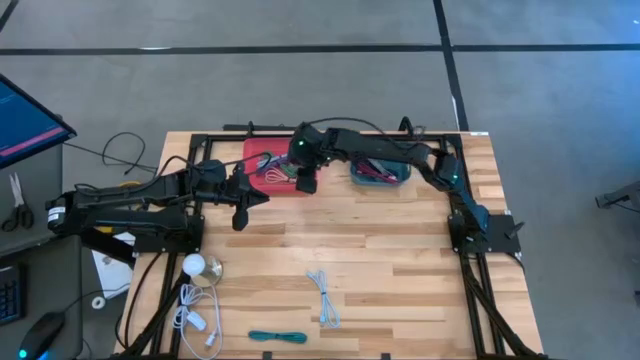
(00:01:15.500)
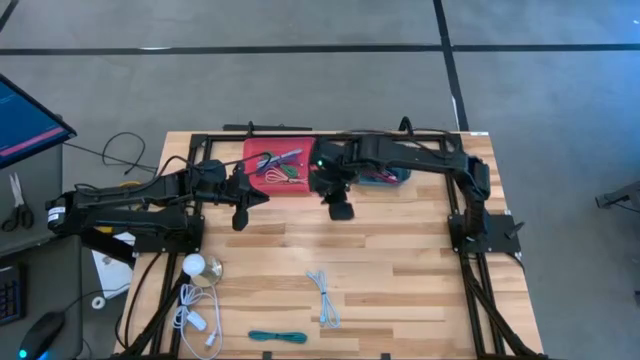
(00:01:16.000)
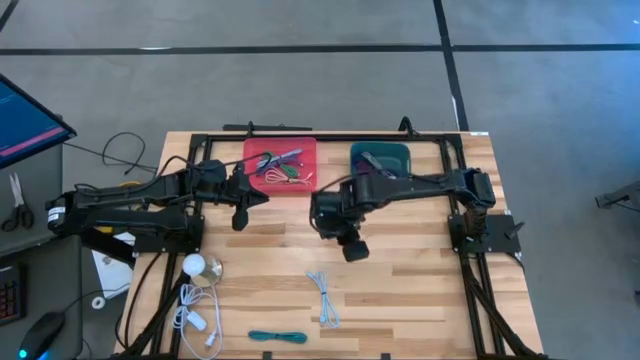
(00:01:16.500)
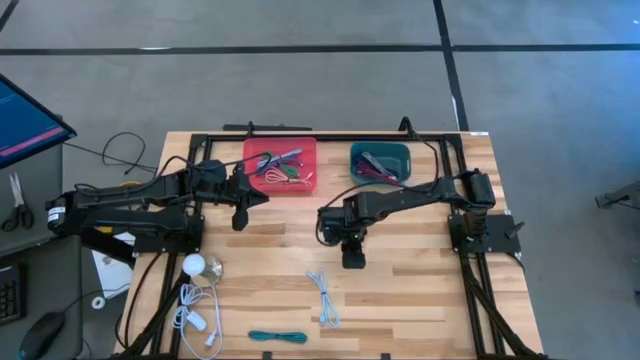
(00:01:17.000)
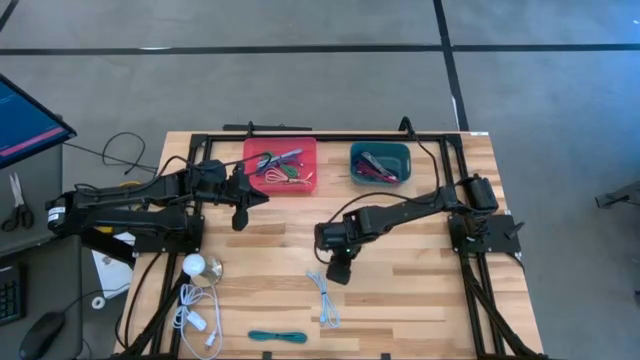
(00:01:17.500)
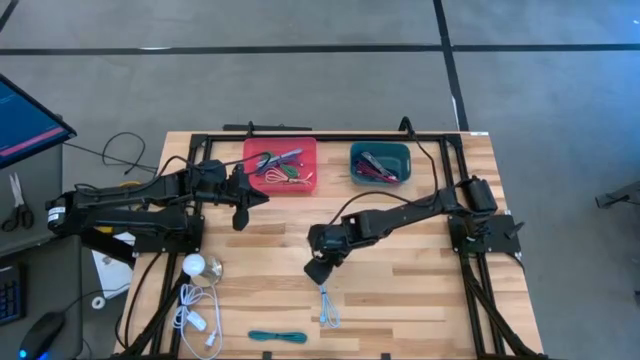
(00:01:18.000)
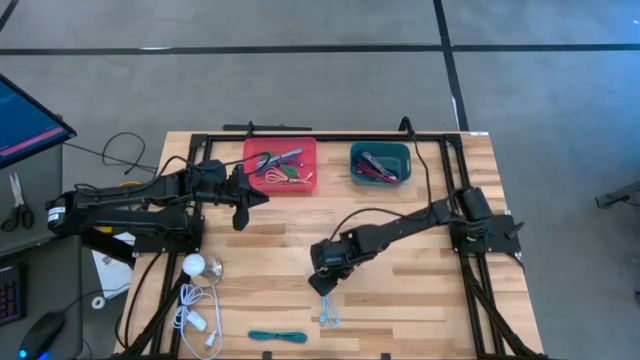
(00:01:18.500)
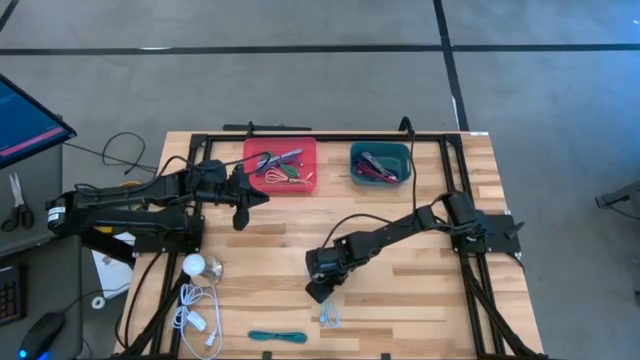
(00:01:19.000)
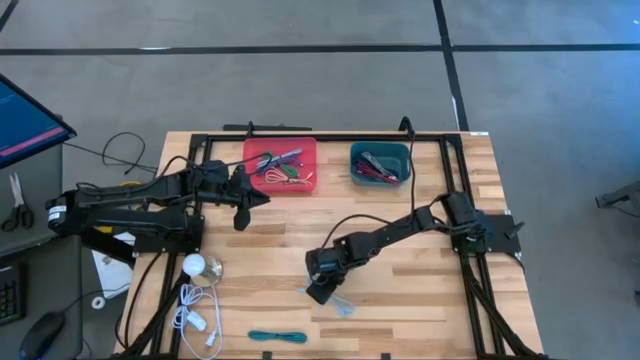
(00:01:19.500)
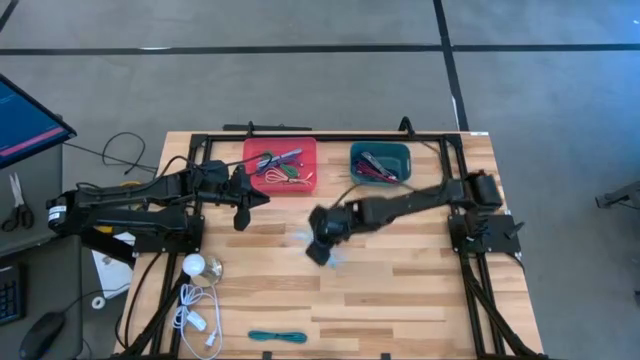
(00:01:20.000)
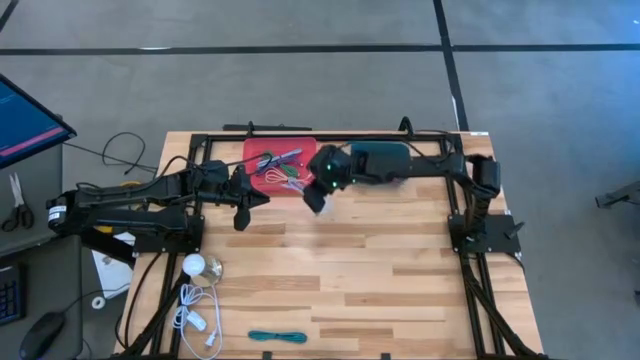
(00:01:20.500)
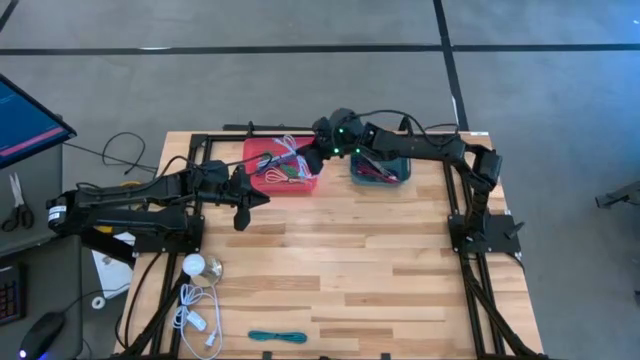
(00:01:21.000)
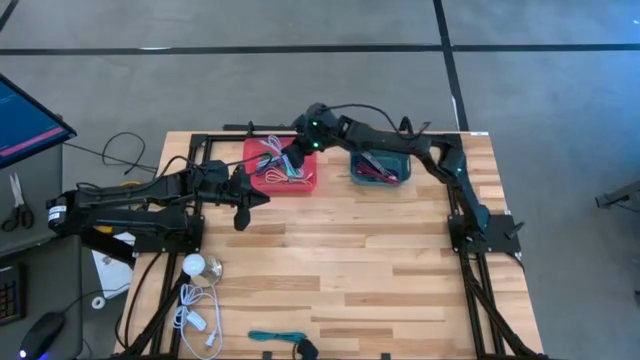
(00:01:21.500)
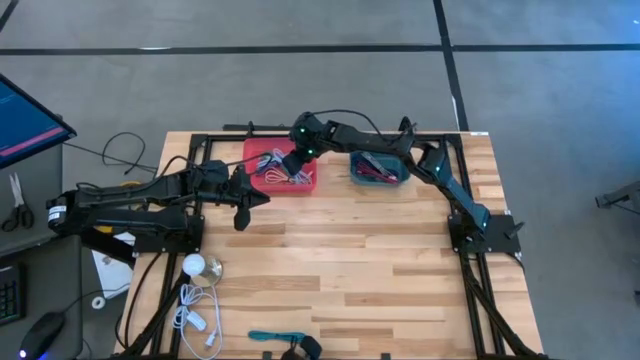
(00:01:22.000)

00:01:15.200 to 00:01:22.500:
Task: Pick & Place USB Port
Put the white charger cable into the red bin

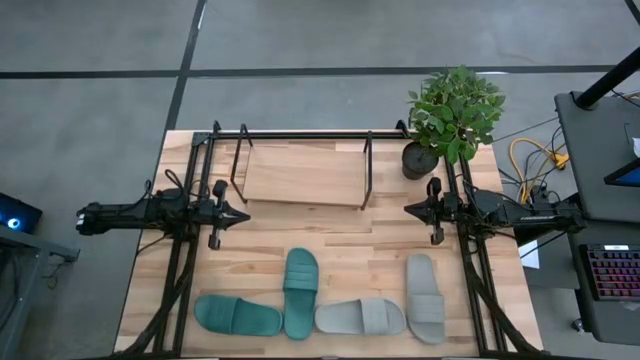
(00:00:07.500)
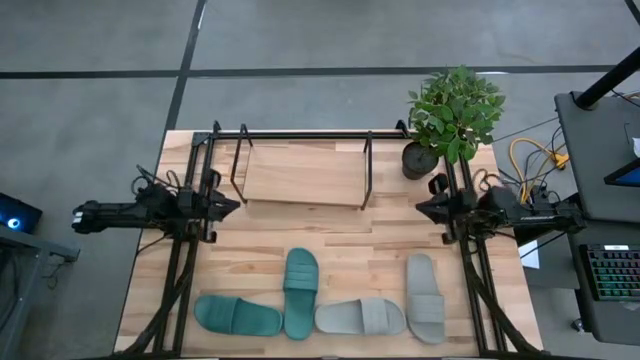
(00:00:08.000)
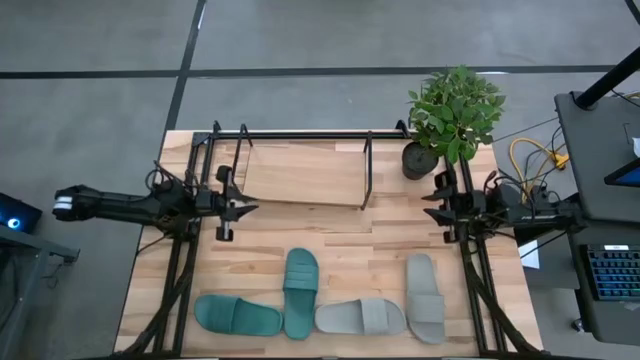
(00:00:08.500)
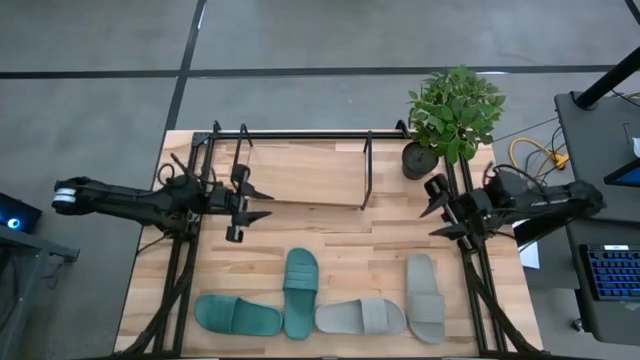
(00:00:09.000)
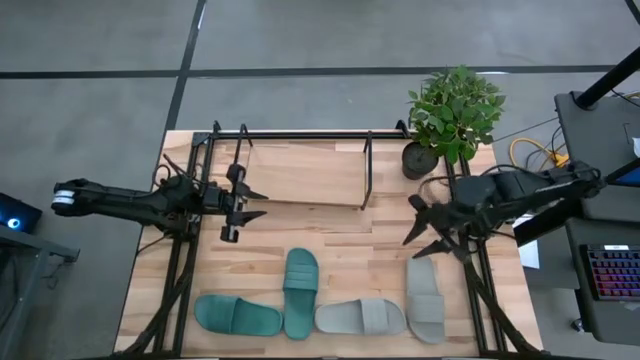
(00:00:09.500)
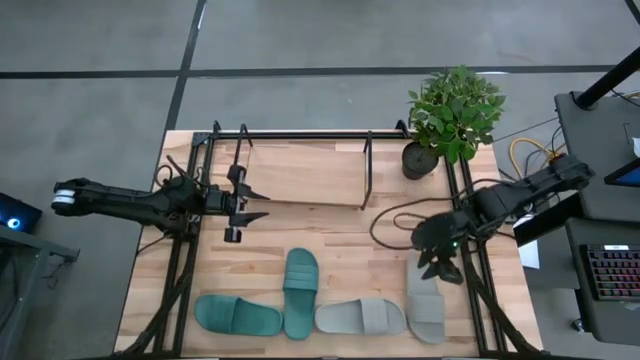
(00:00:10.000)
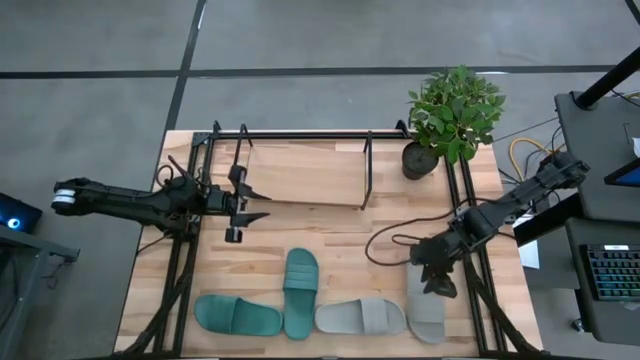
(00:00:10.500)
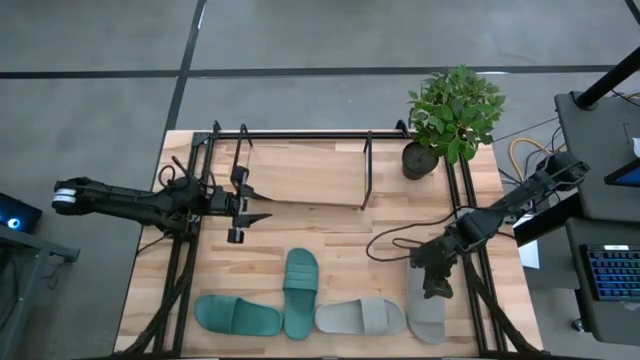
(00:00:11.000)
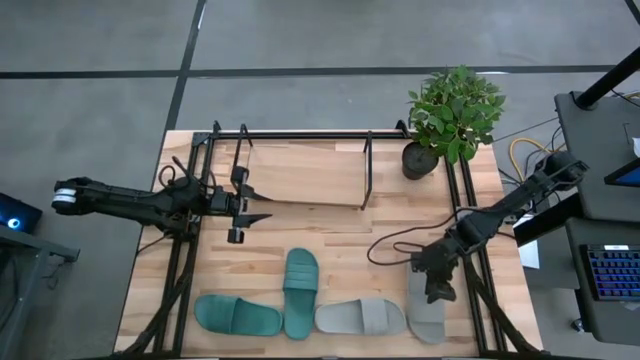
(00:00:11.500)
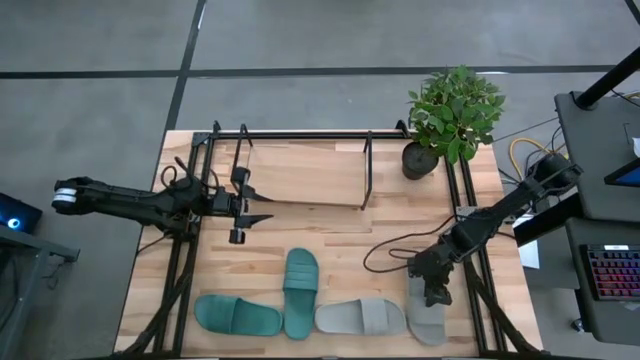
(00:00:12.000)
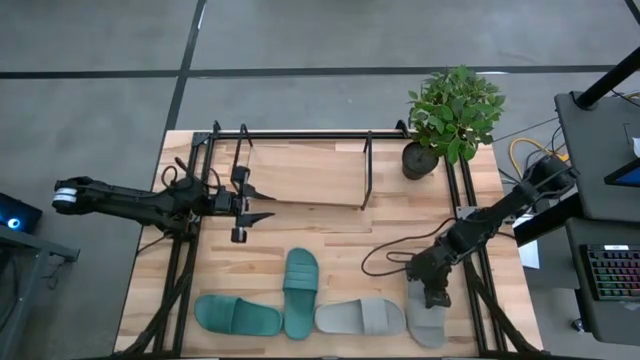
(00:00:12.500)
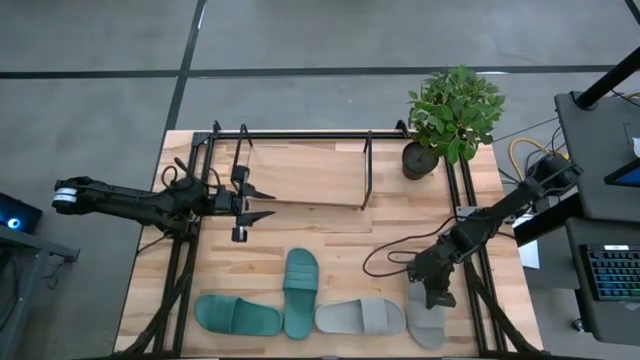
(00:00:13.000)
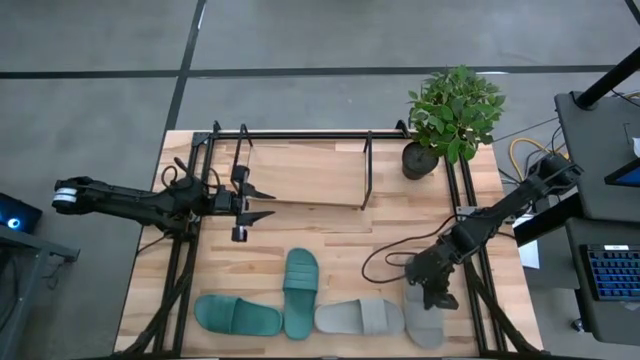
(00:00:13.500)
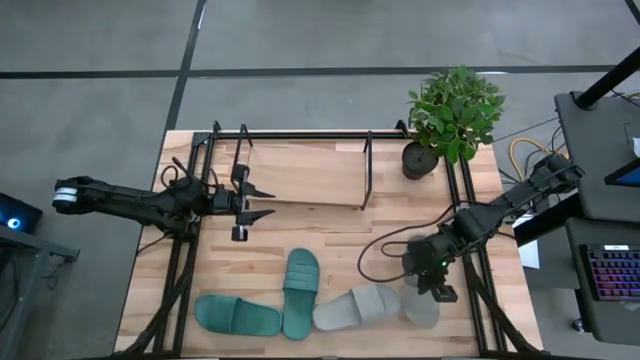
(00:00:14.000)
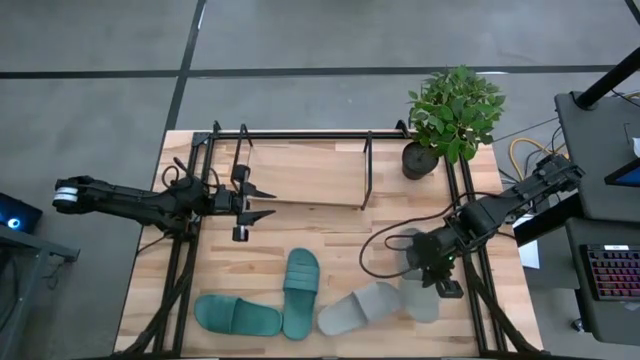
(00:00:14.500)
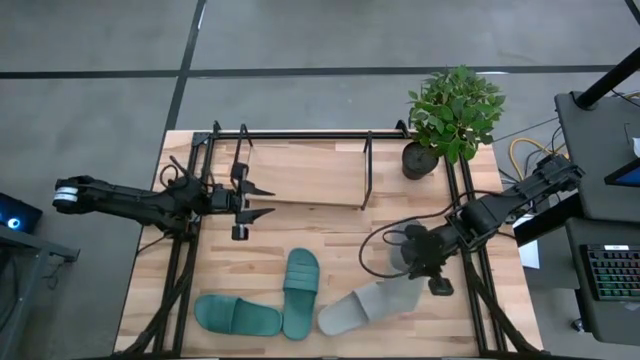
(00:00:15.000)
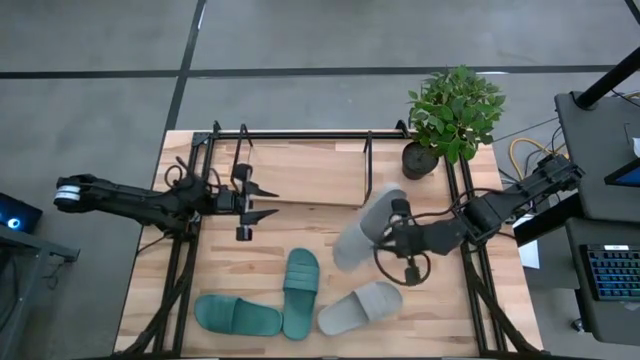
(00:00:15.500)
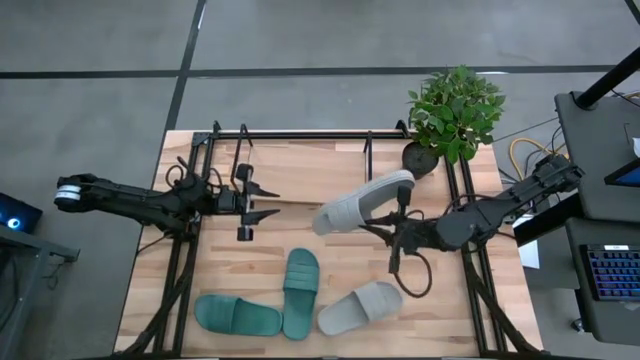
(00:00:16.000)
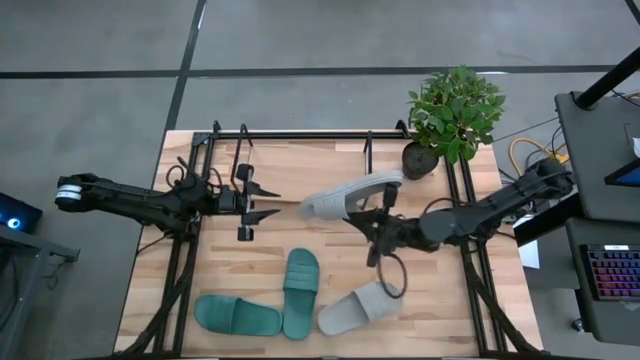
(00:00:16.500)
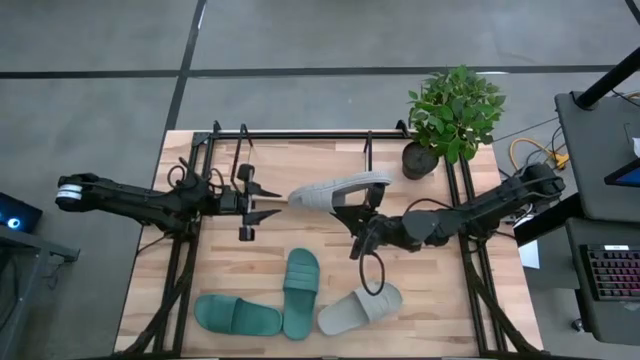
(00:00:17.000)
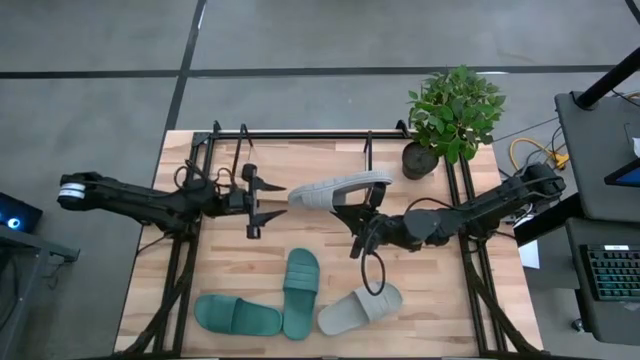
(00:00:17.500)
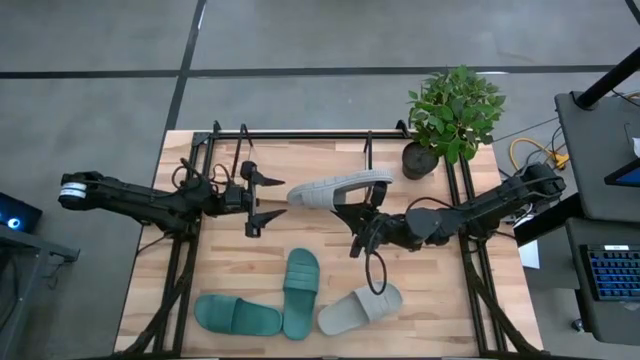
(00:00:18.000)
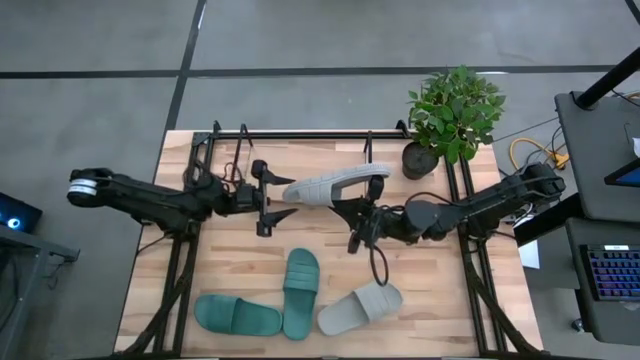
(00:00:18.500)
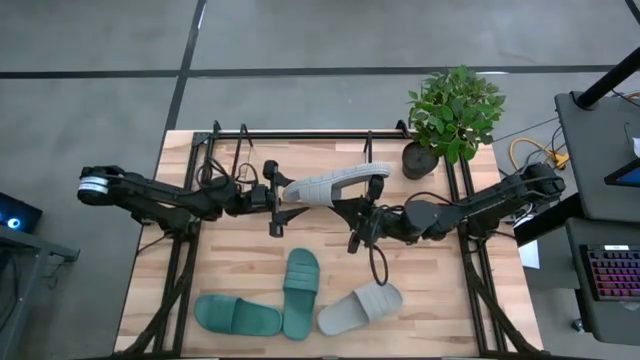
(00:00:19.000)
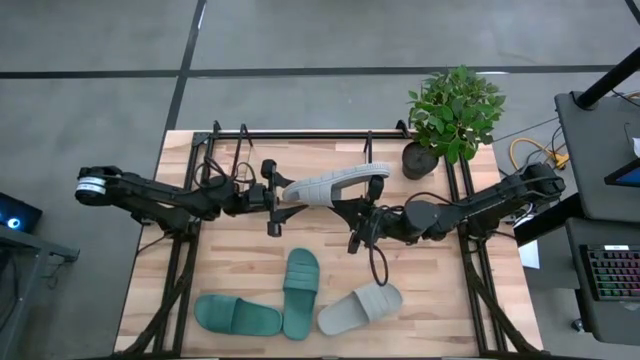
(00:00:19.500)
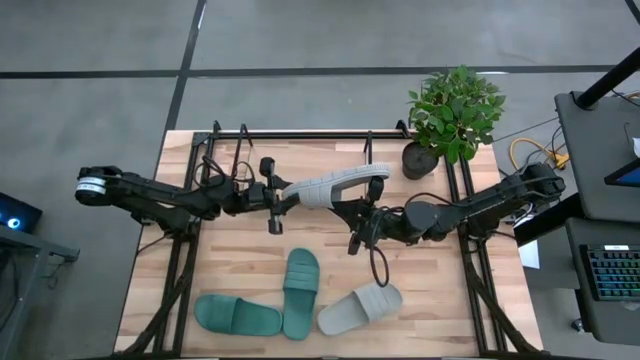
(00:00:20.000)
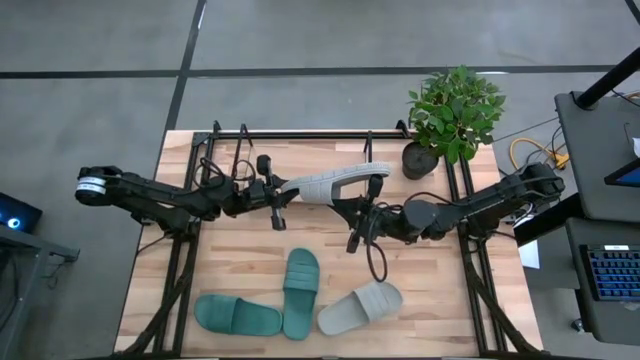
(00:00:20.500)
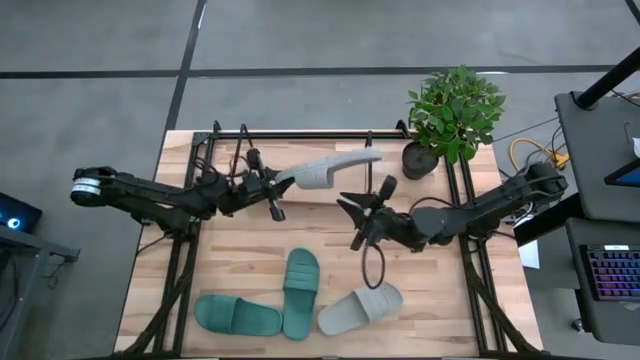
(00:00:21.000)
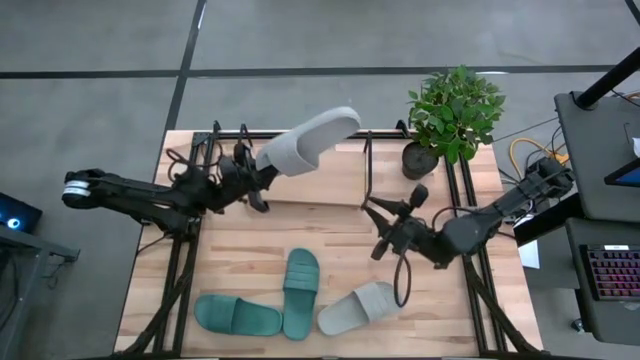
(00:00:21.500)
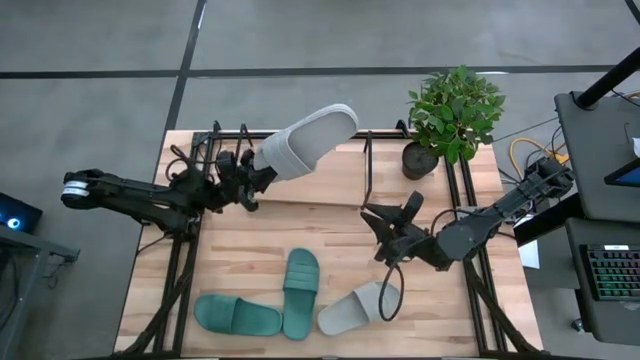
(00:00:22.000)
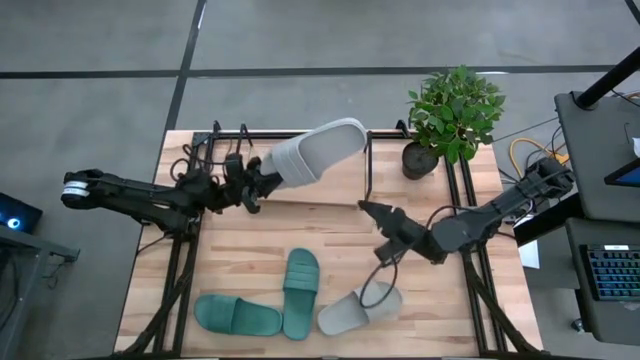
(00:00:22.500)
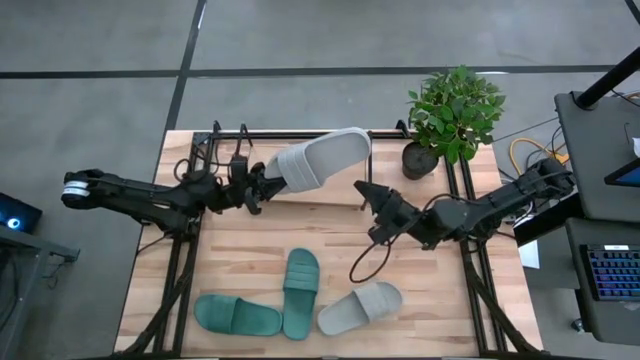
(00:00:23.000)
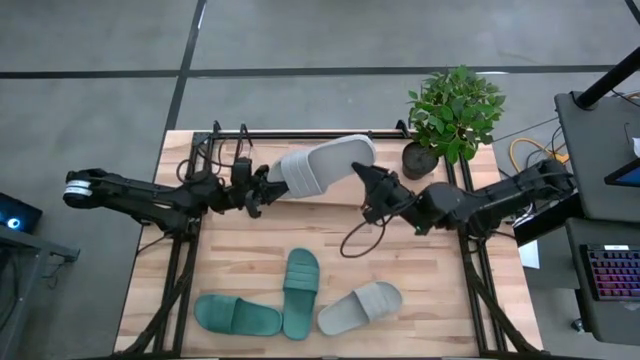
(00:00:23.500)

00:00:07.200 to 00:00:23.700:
Task: Pick and place slides into the shelf
Put the right grey slide on the shelf
